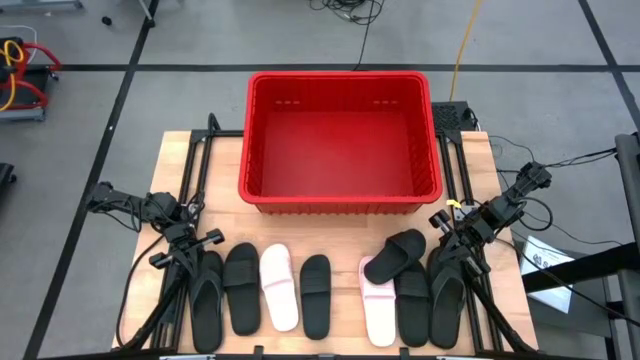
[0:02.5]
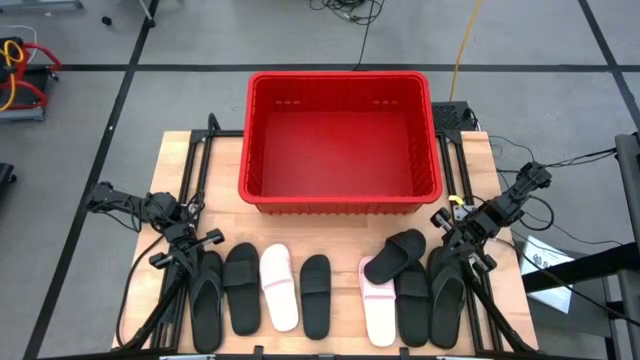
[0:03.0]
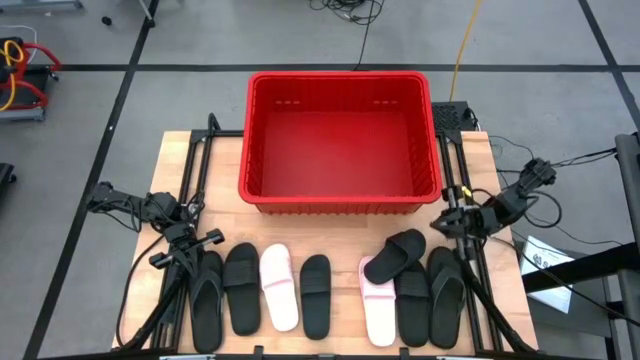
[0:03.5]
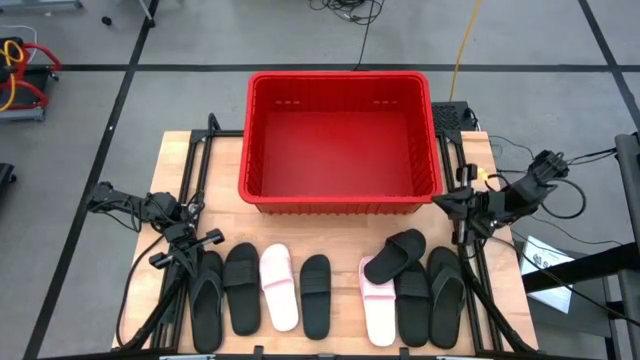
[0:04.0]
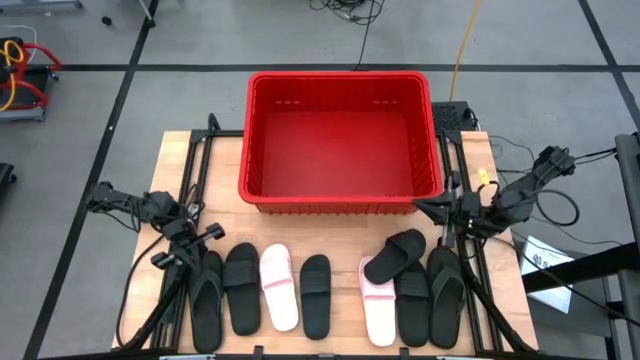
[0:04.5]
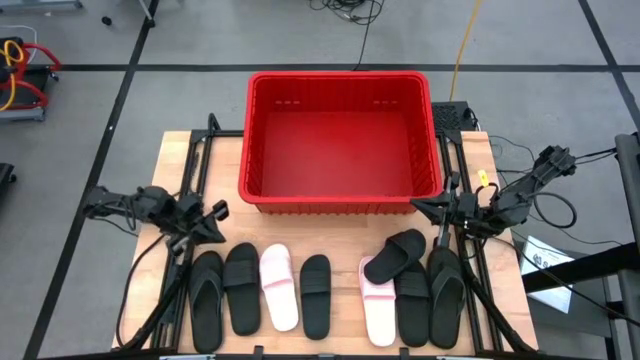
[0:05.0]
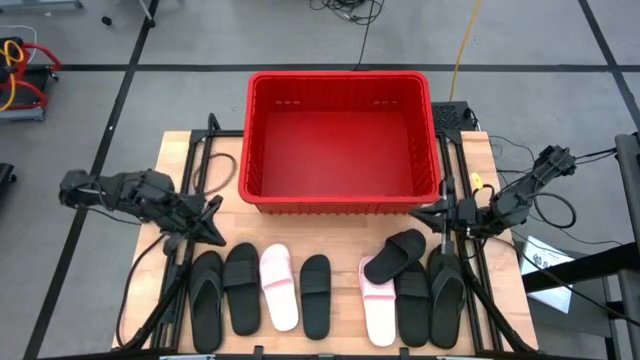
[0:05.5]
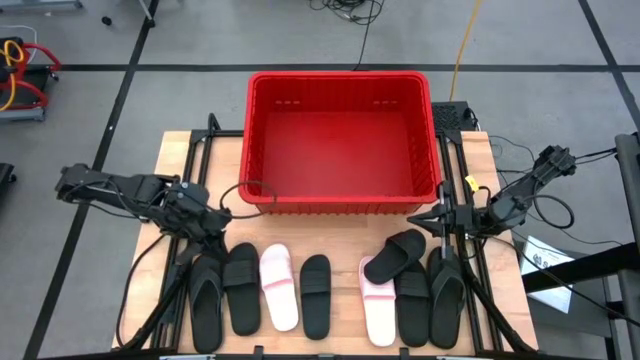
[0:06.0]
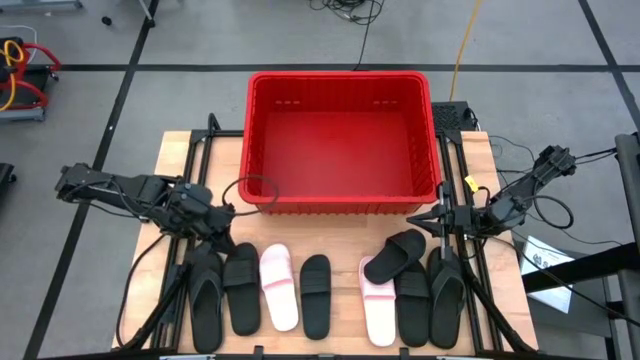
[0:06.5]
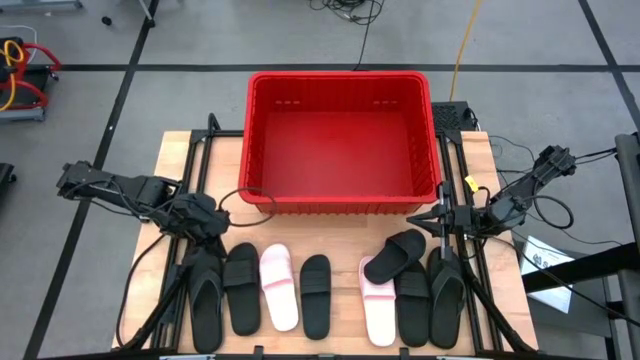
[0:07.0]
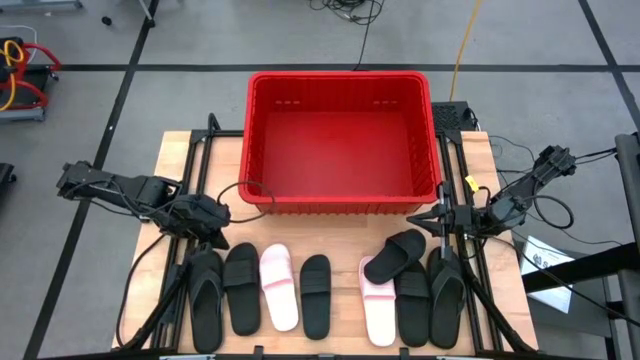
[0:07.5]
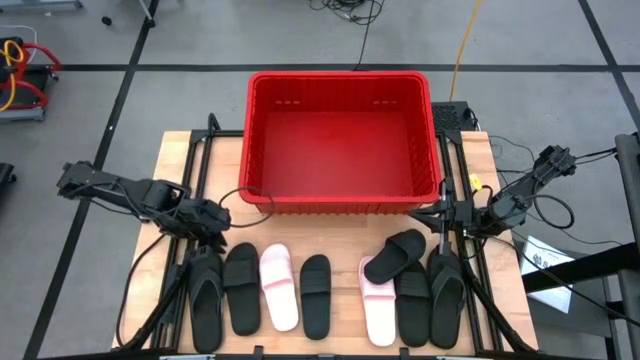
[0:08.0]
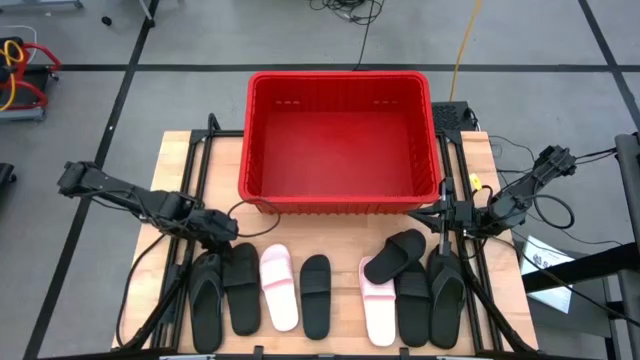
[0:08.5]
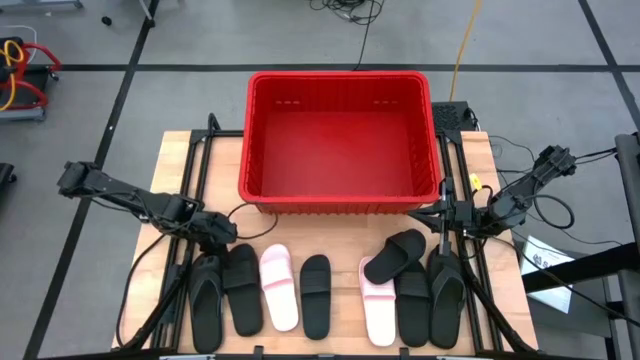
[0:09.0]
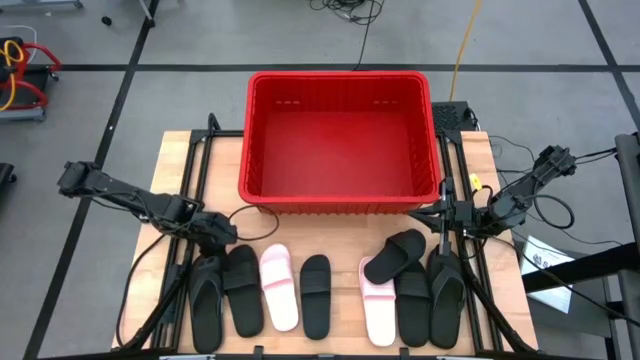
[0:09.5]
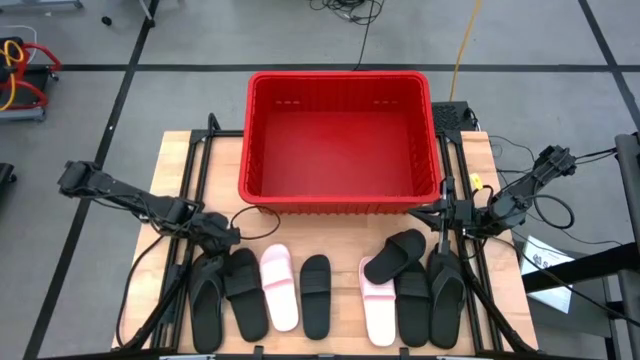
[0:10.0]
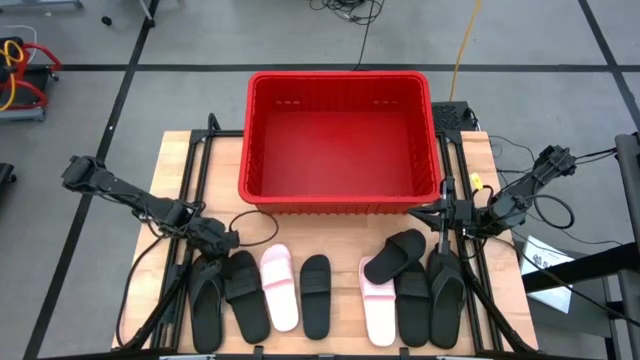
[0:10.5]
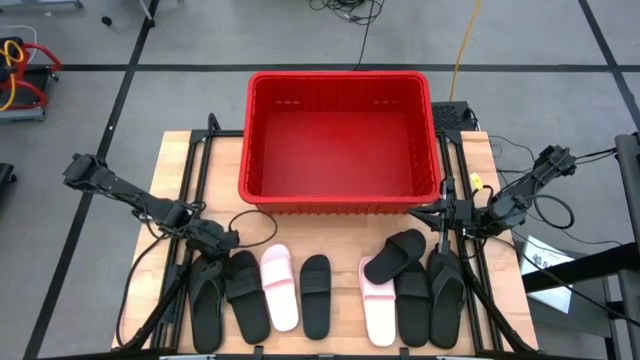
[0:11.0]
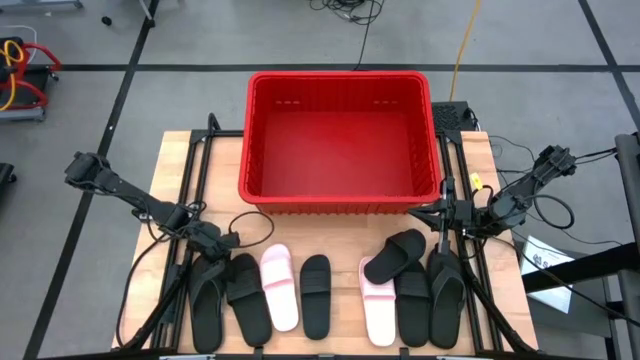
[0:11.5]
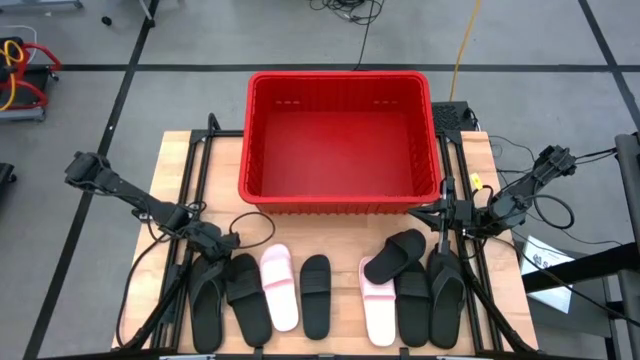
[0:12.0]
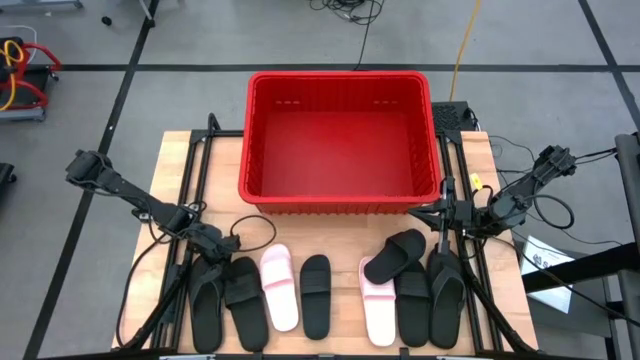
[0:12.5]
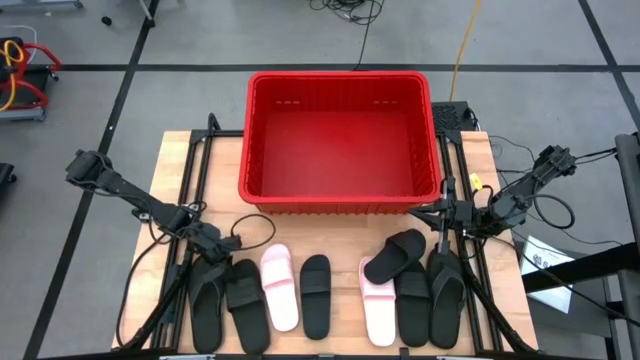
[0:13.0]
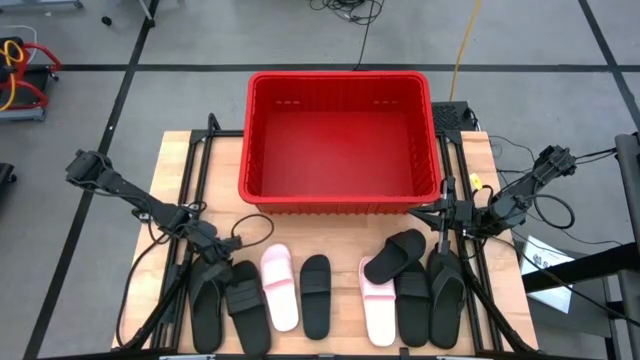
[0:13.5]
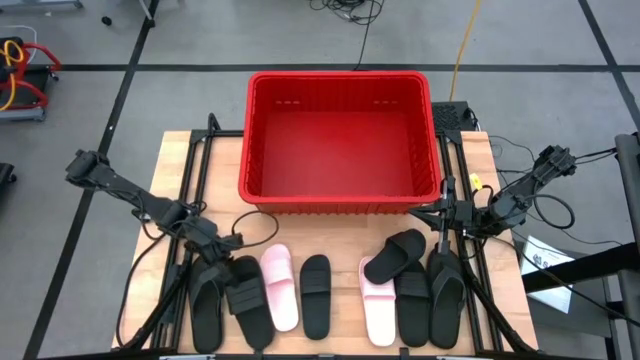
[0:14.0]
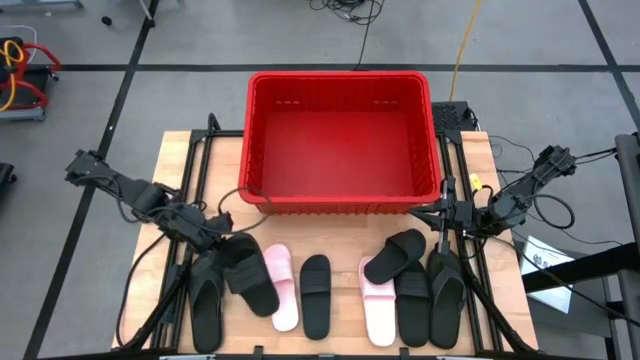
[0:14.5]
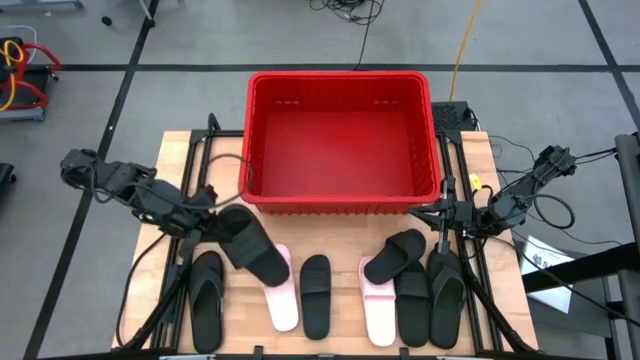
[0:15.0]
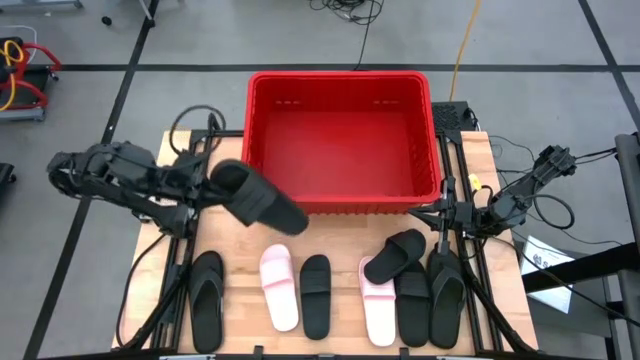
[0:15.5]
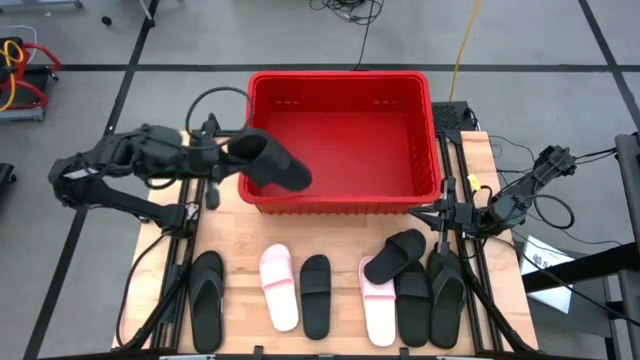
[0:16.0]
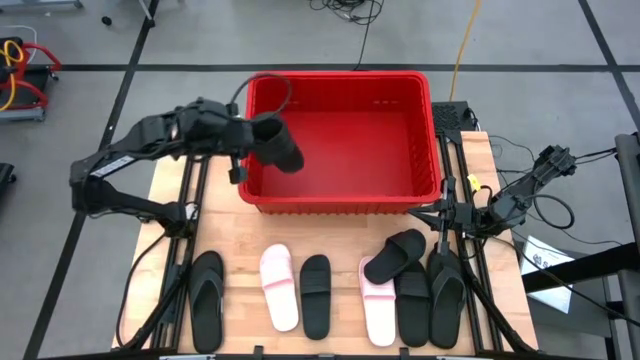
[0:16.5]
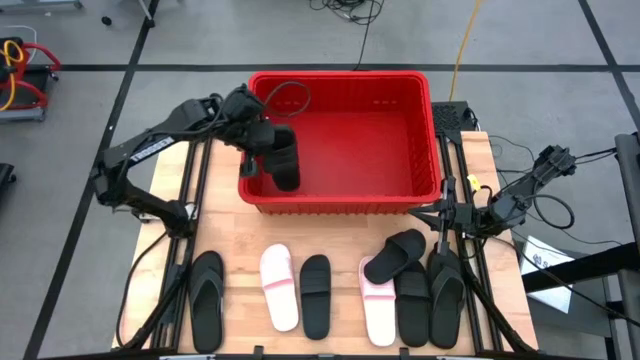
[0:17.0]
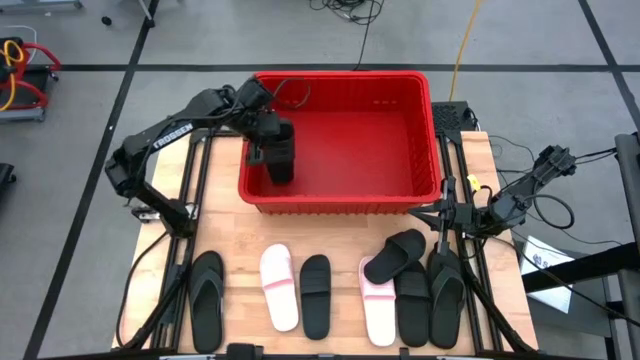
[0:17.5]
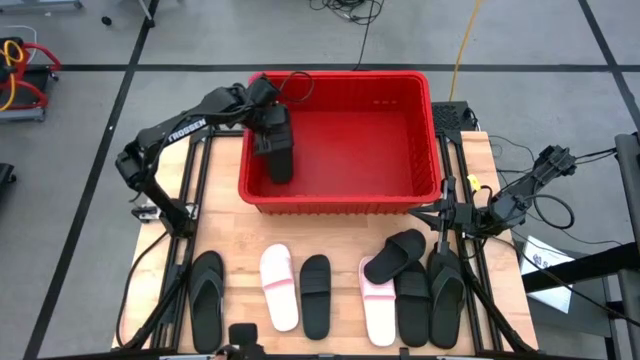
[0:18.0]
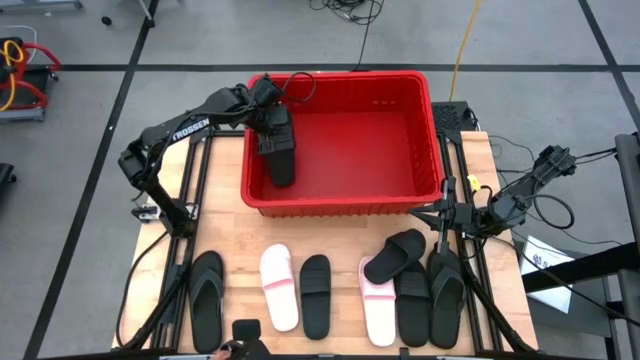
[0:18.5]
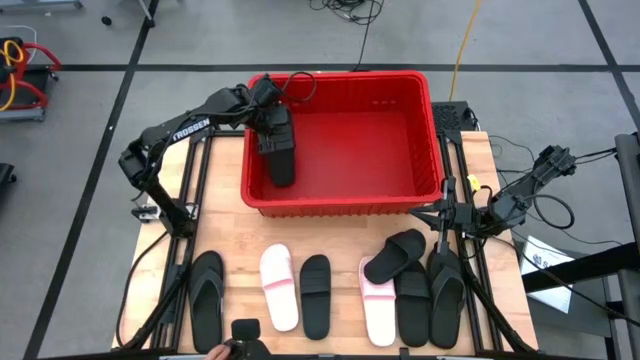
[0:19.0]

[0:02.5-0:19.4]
Task: Pick and place slides into bin
Put the black slide into the red container

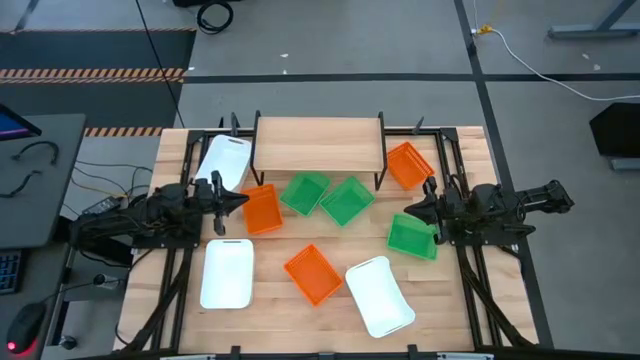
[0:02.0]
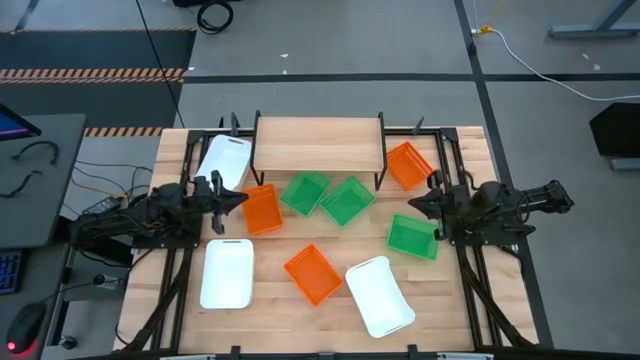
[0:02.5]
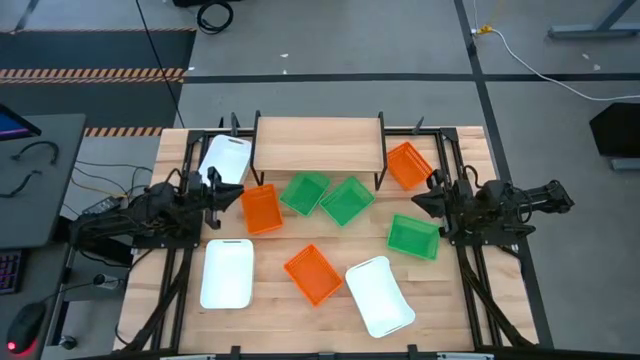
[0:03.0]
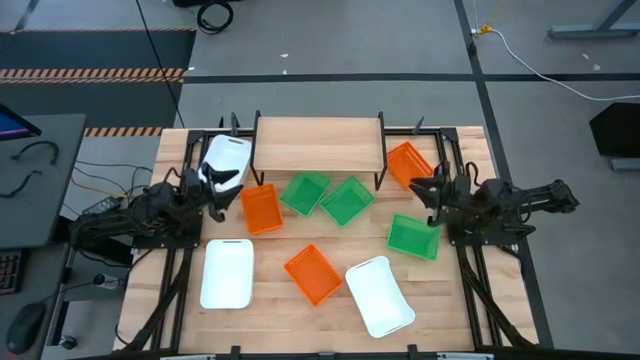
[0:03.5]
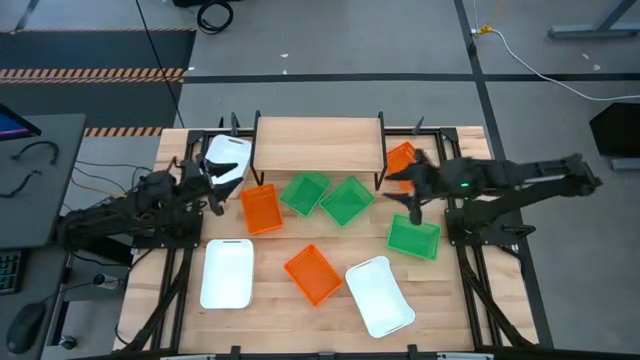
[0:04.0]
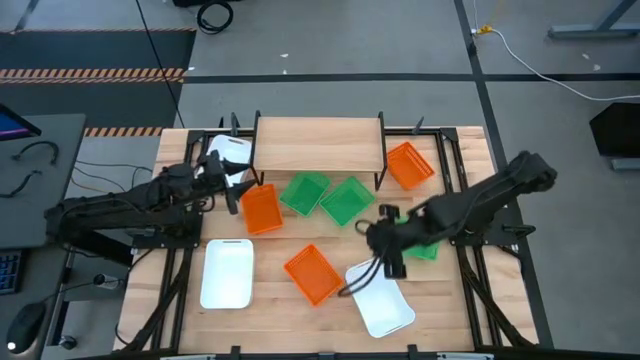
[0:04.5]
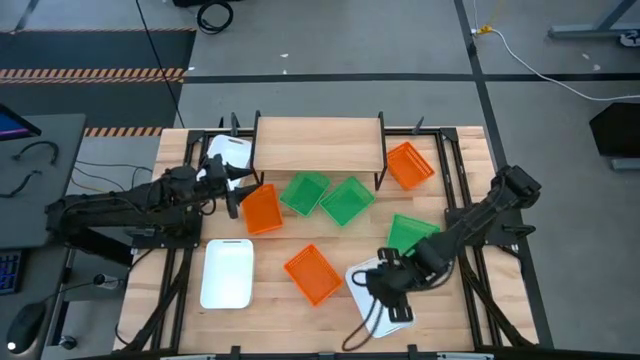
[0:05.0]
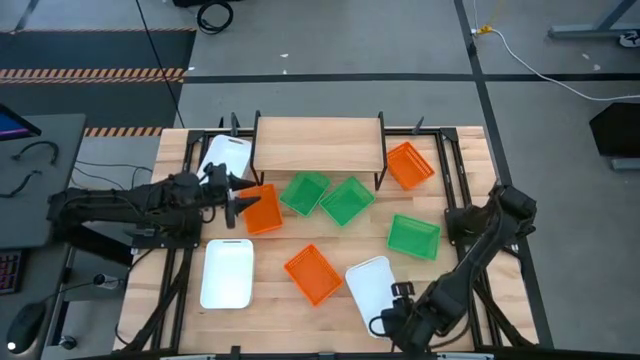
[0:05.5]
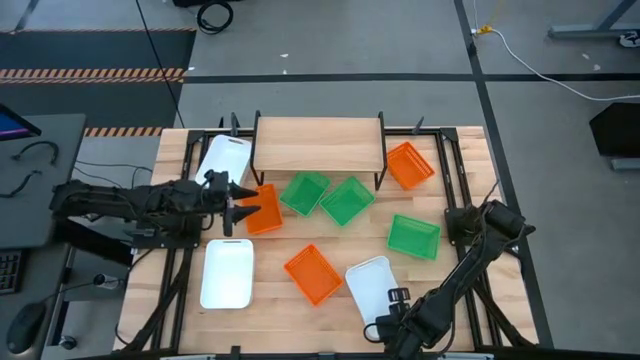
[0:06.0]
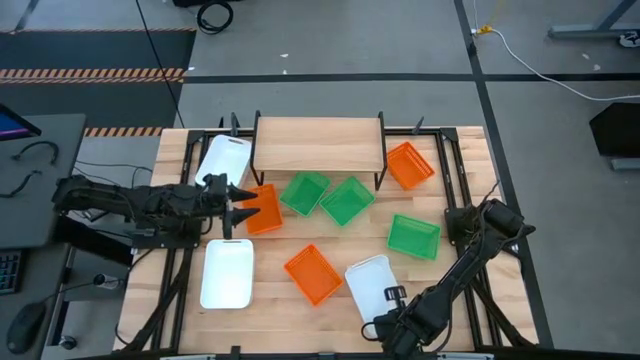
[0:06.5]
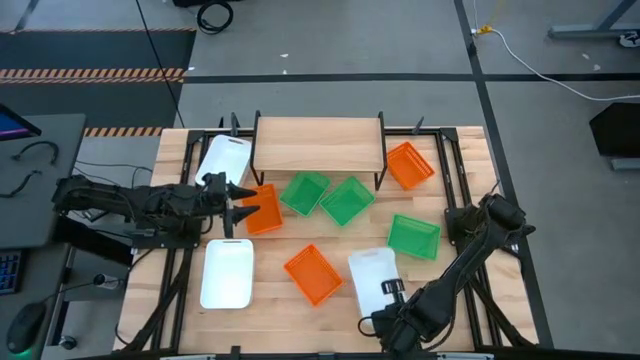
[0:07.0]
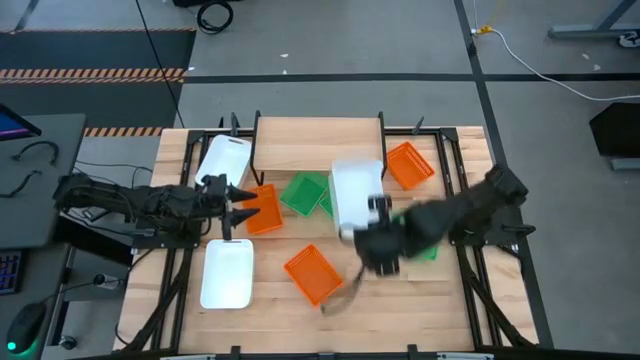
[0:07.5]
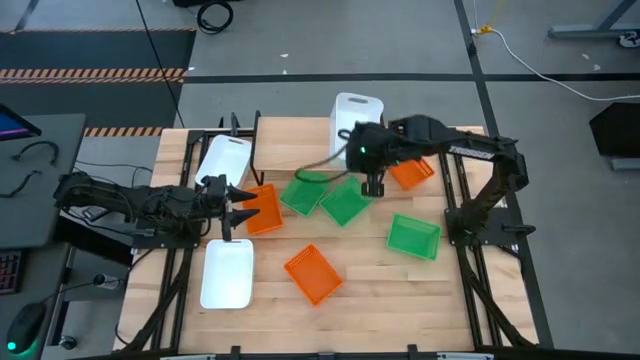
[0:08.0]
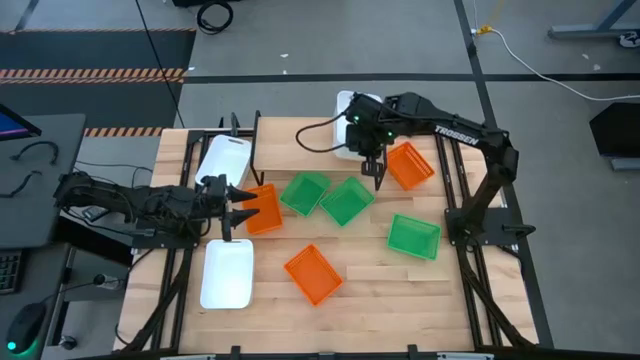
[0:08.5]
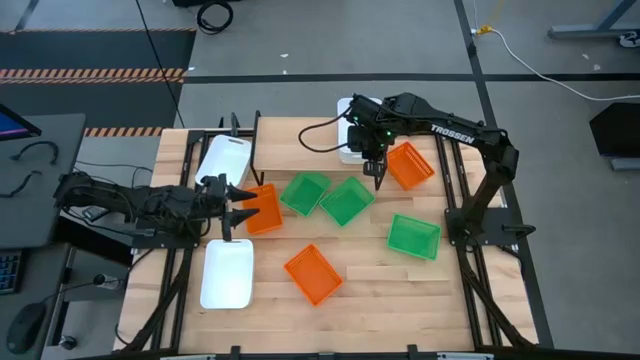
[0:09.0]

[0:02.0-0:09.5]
Task: Stack baskets on shelf by color
Put the right white bin on the shelf
